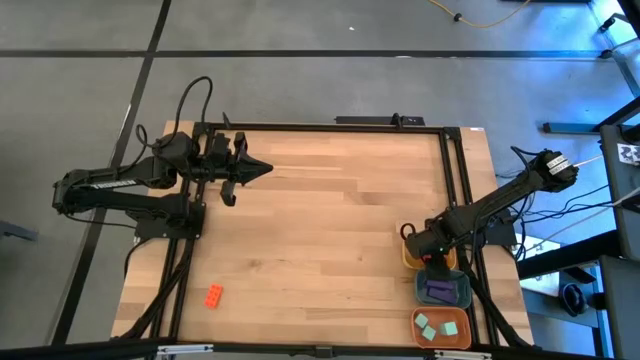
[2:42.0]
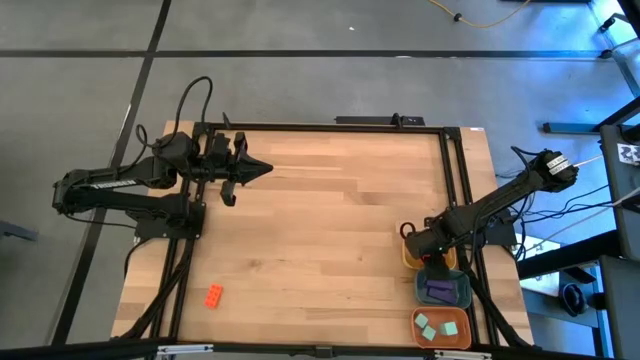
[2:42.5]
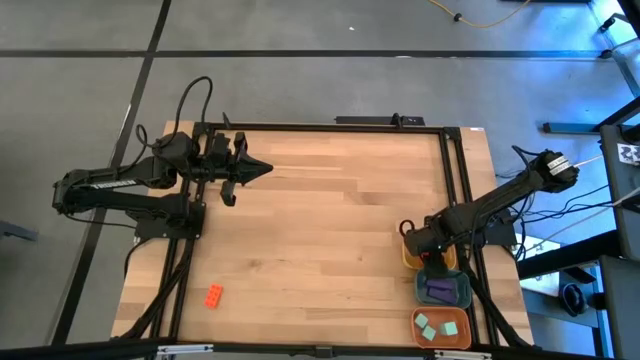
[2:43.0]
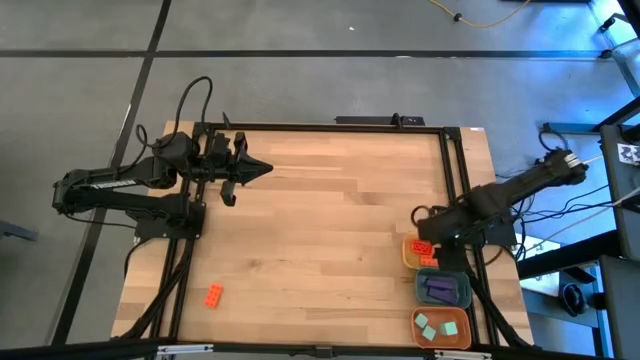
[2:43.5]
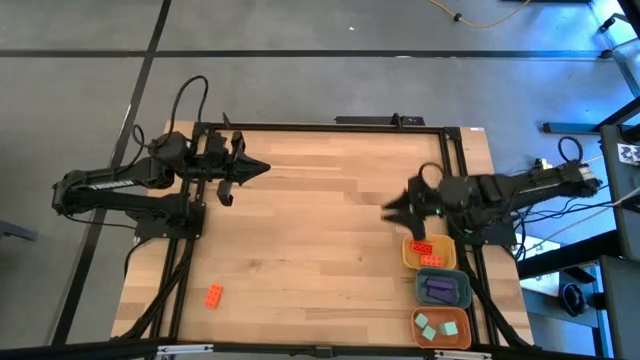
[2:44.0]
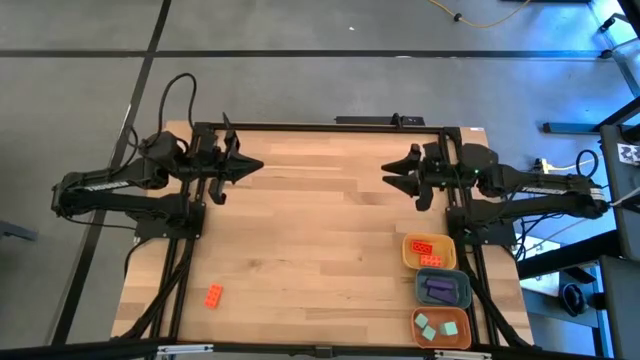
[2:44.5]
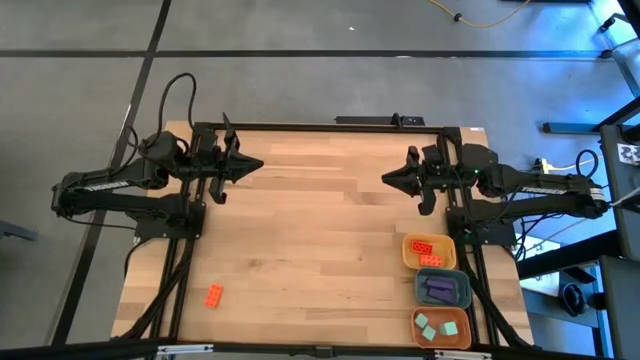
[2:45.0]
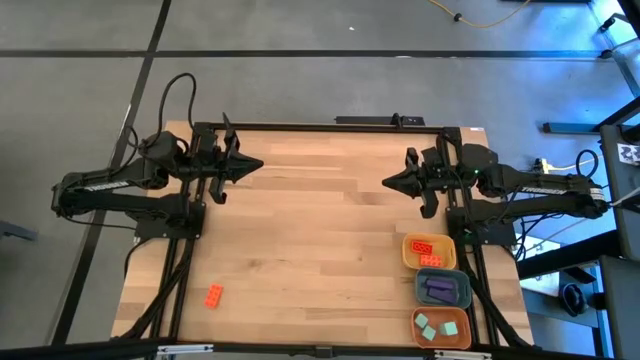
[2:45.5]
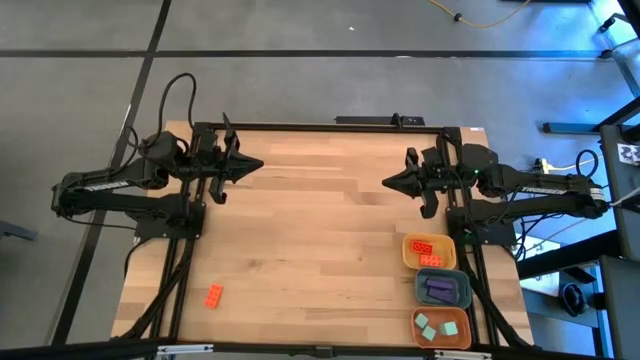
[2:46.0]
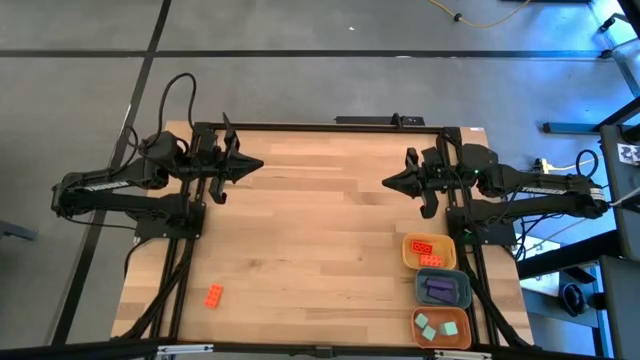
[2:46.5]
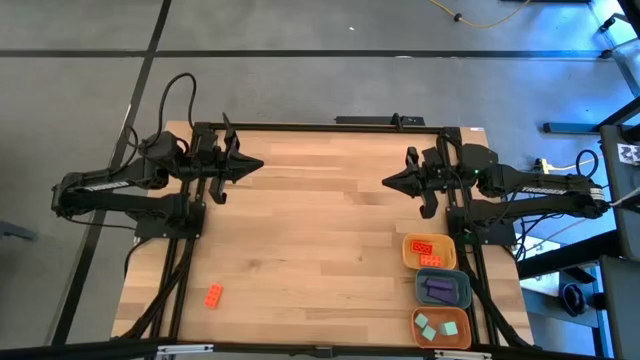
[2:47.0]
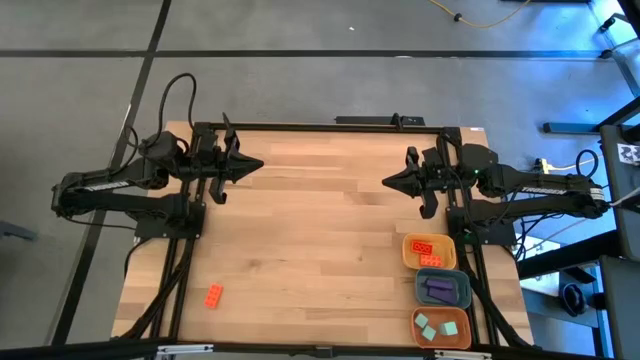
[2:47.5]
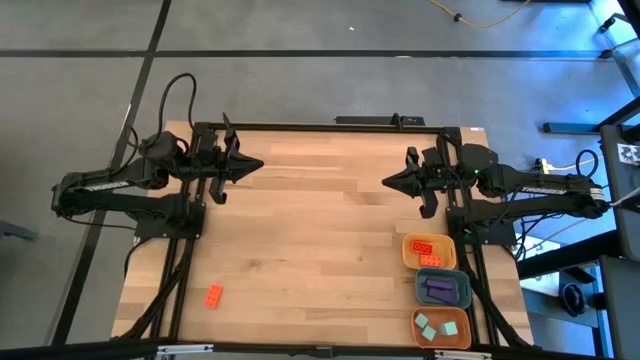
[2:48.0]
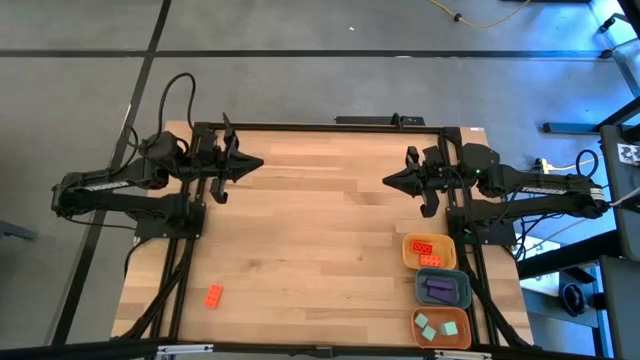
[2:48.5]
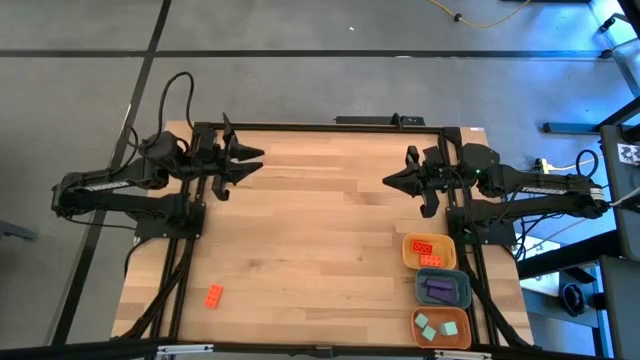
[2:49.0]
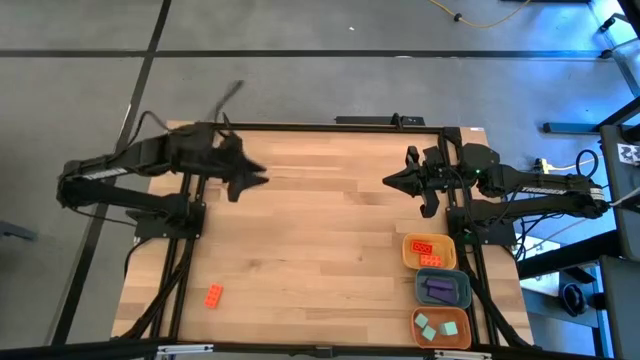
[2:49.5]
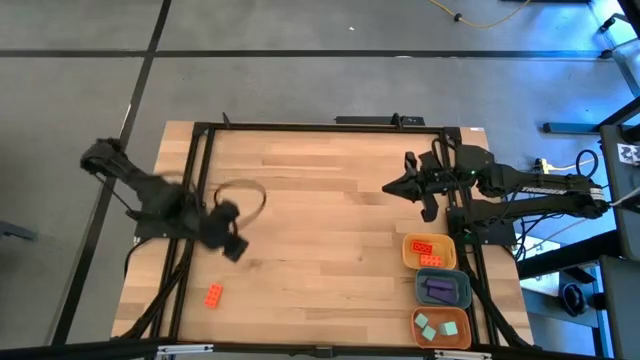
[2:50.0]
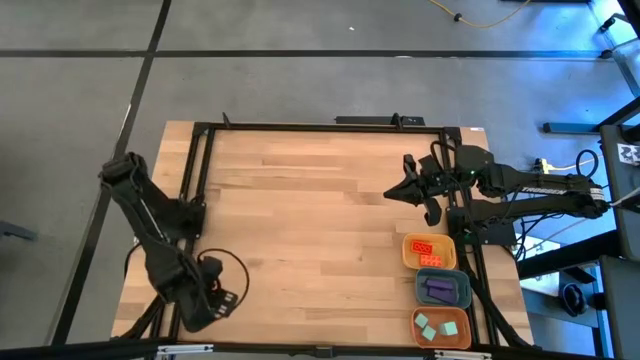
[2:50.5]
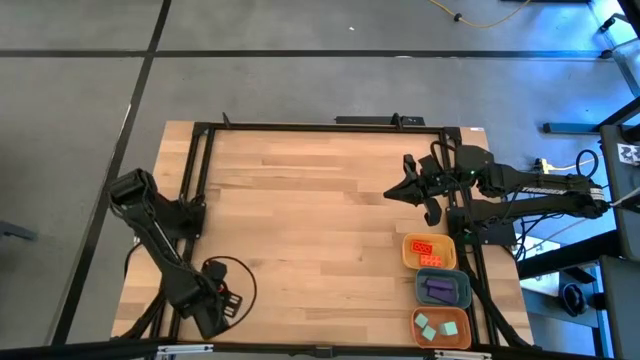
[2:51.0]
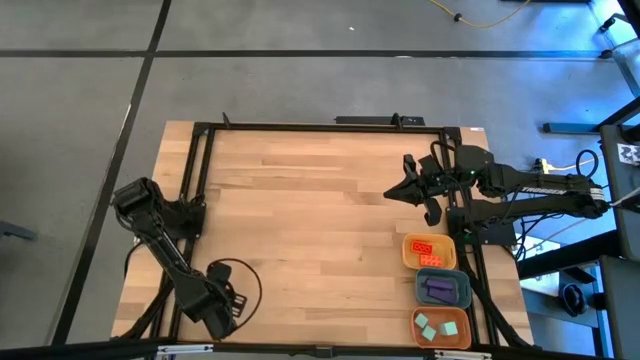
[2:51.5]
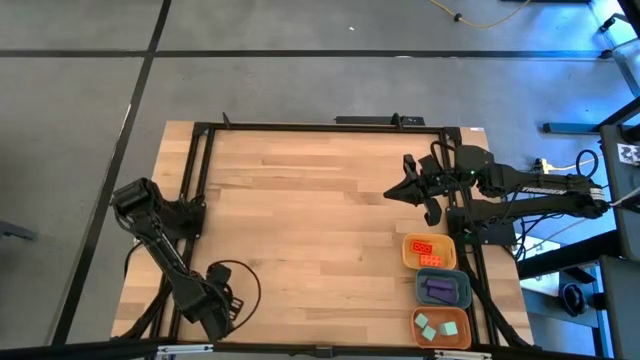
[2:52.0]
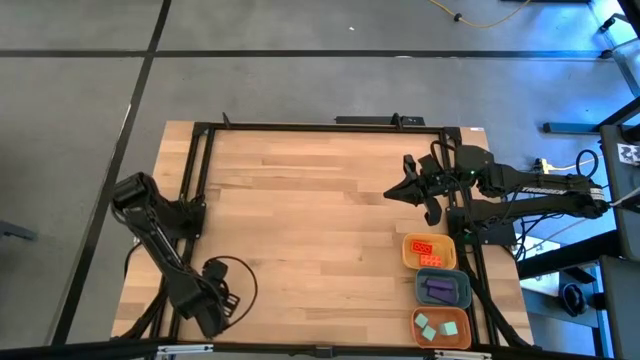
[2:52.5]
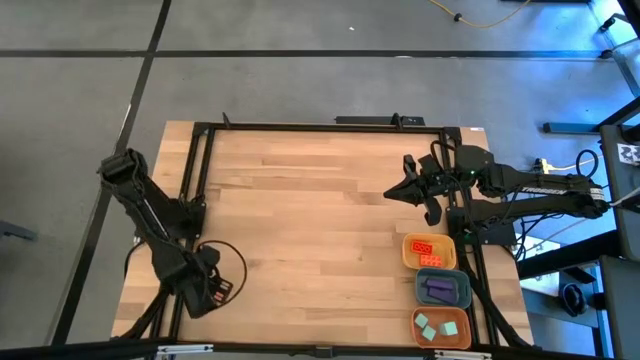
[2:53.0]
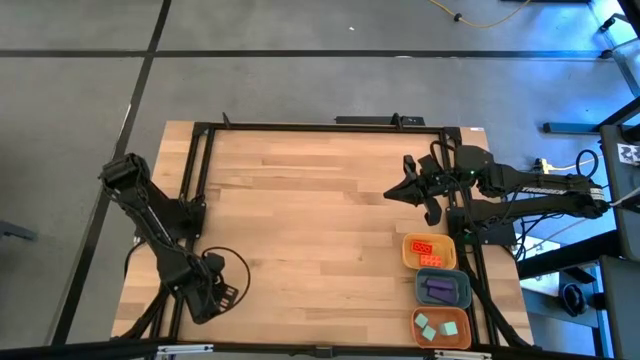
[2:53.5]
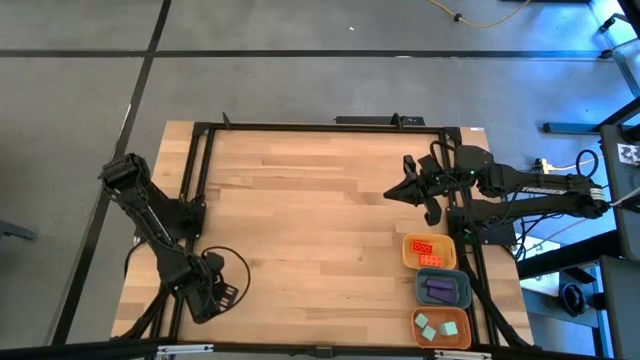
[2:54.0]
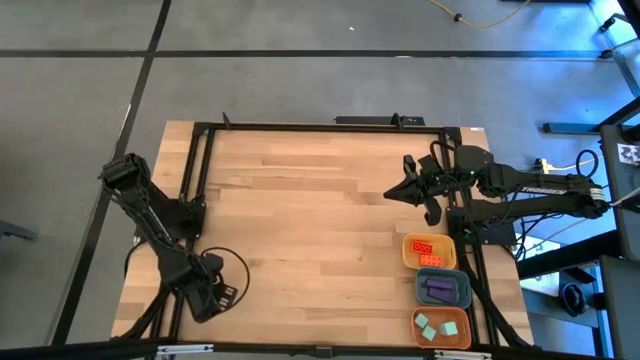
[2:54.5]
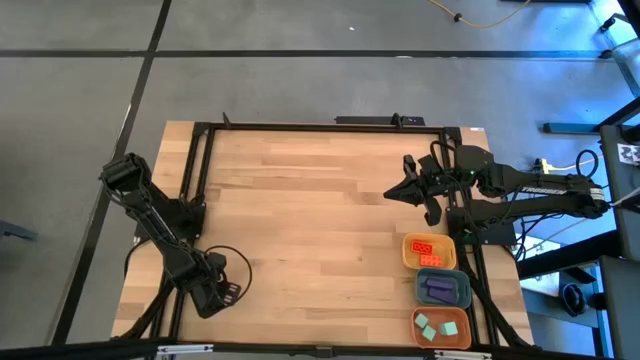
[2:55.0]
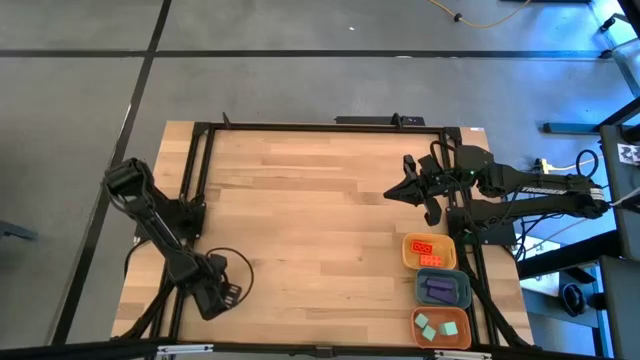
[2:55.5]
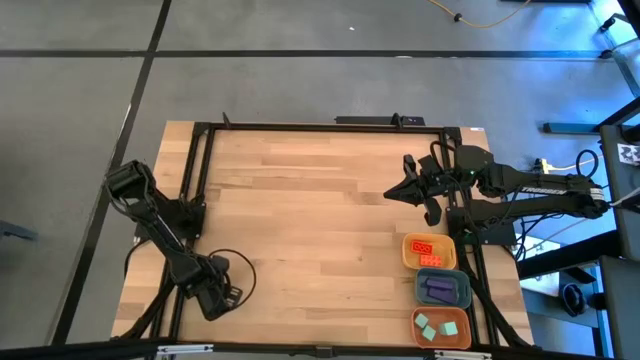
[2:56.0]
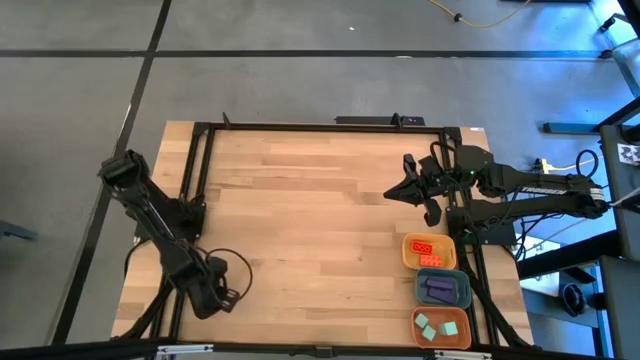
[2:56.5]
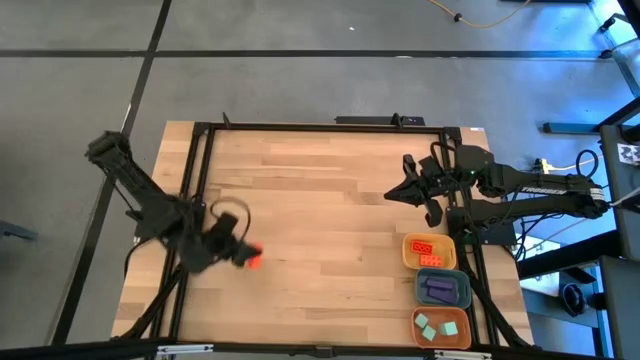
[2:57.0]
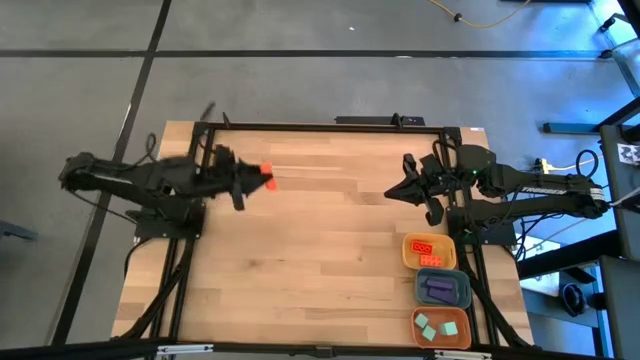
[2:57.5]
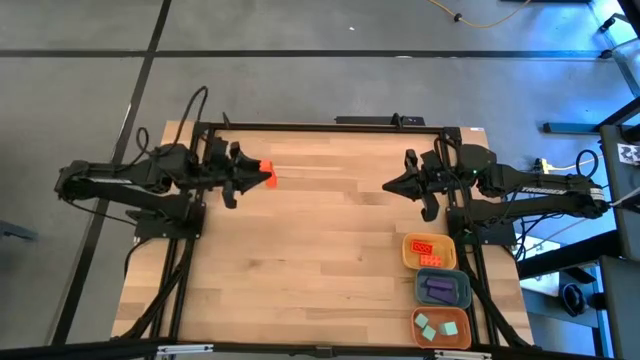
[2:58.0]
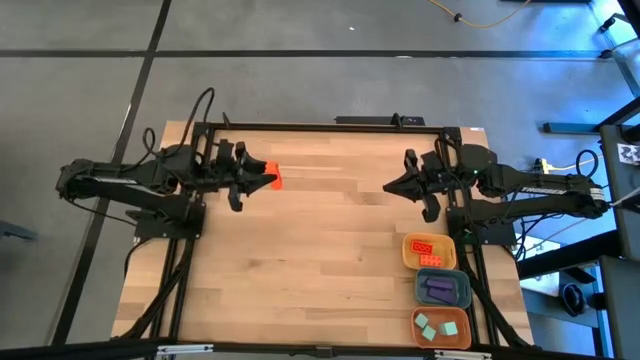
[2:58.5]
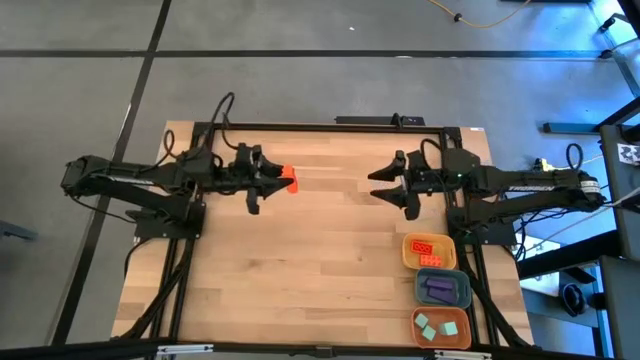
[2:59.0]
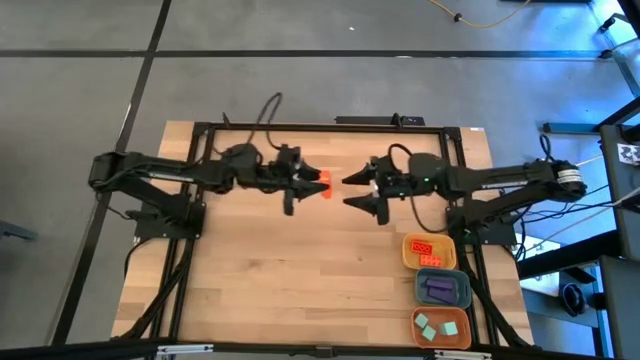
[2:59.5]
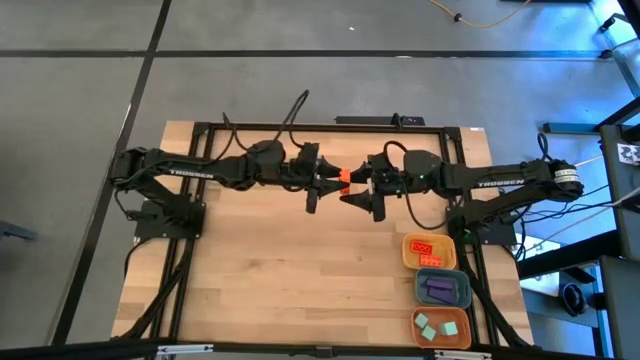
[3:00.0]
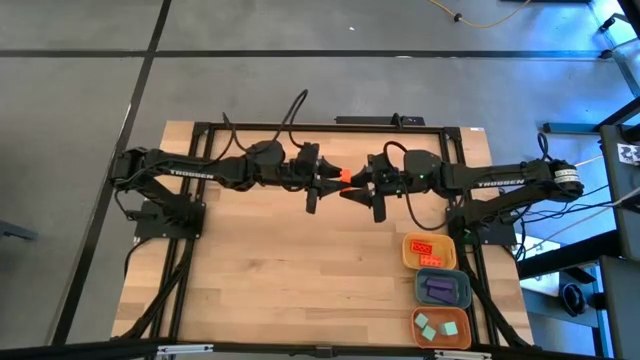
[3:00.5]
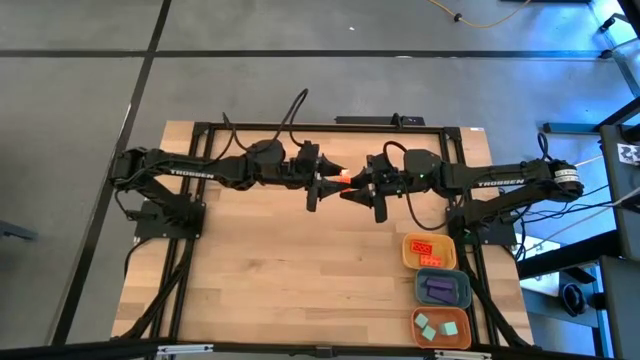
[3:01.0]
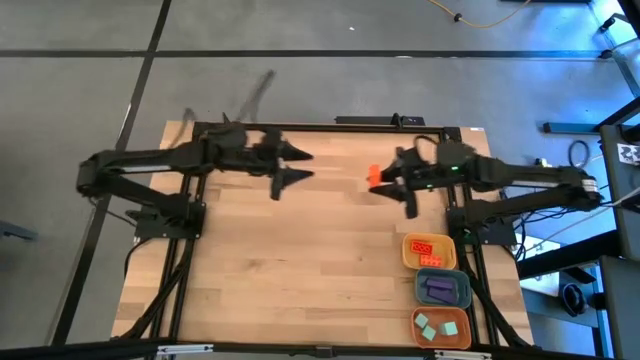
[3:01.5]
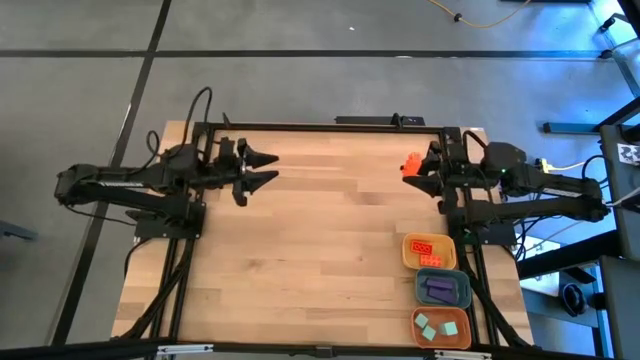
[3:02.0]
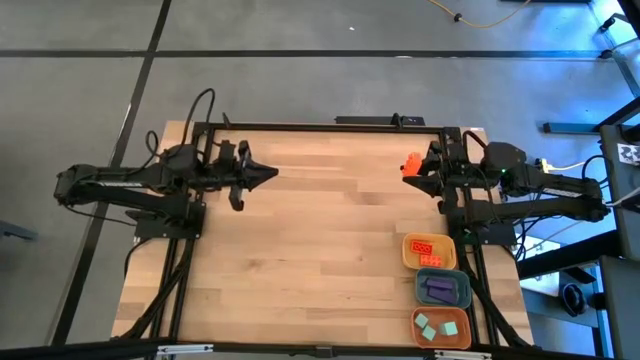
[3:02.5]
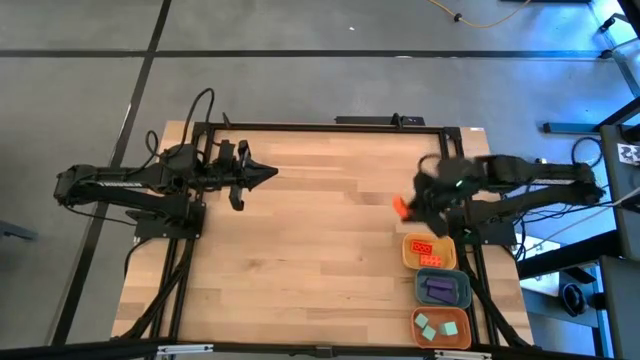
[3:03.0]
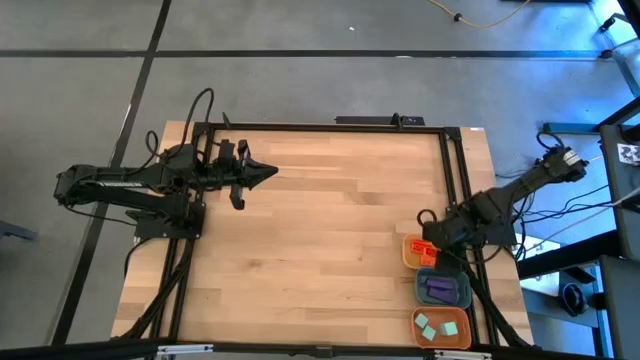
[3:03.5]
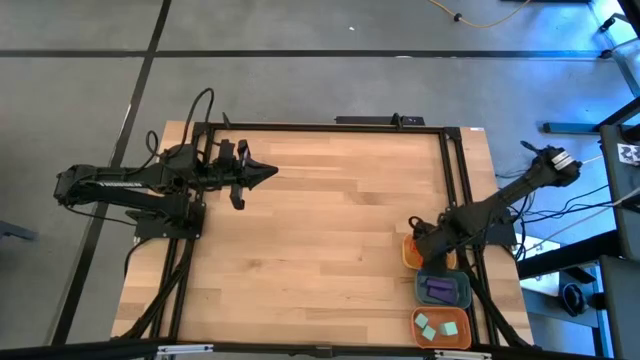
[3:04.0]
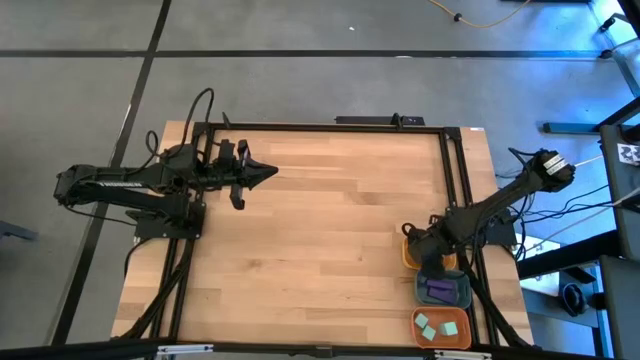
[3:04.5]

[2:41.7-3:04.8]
Task: Sort & place blocks by color
Put the orange game piece into the yellow bin
